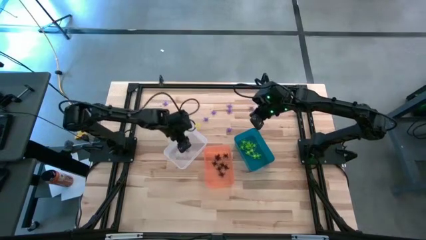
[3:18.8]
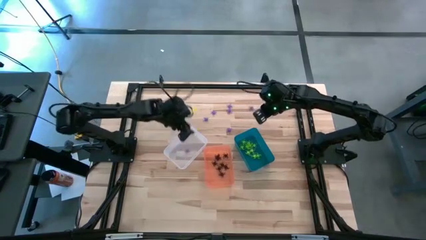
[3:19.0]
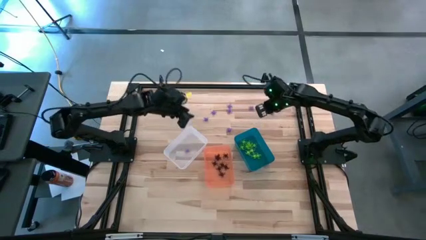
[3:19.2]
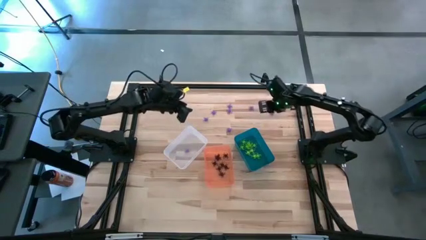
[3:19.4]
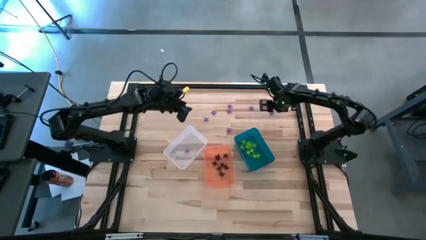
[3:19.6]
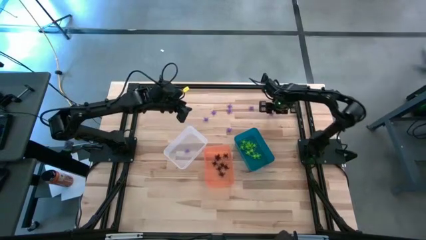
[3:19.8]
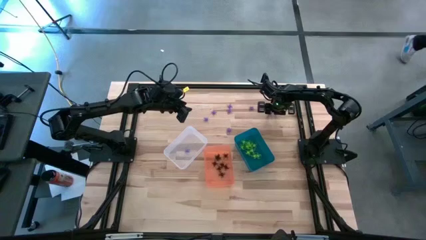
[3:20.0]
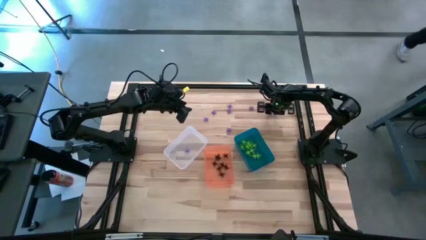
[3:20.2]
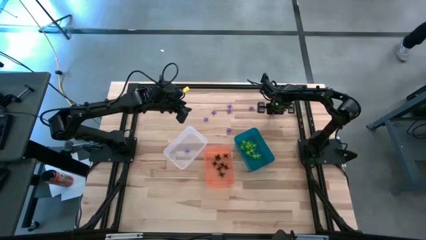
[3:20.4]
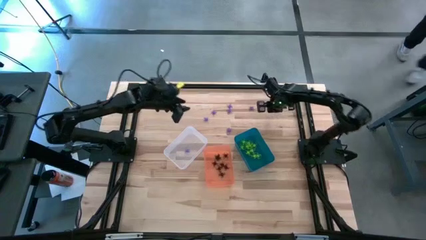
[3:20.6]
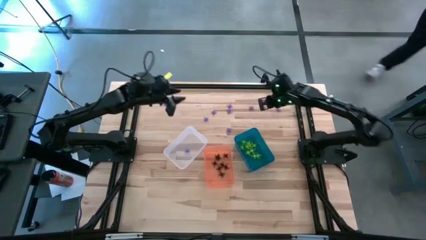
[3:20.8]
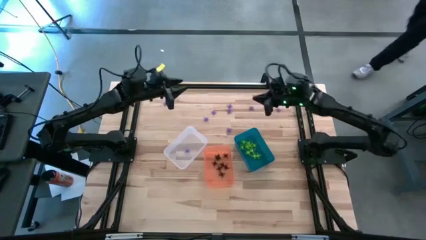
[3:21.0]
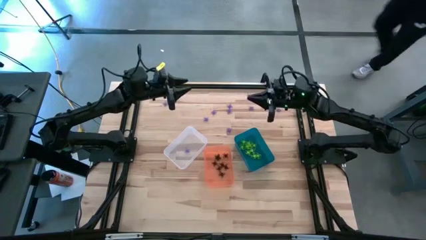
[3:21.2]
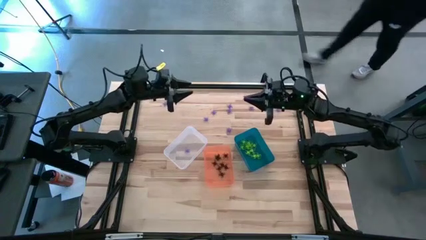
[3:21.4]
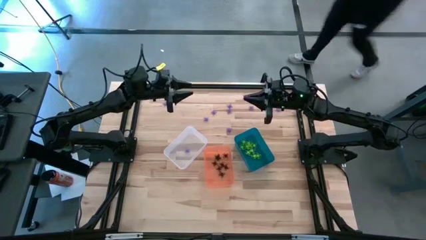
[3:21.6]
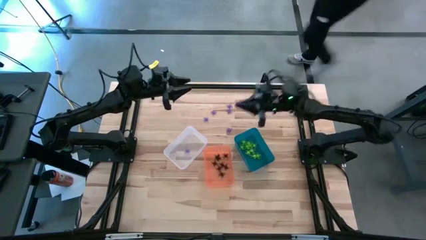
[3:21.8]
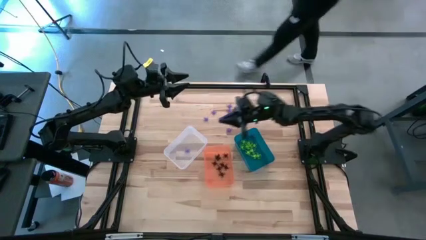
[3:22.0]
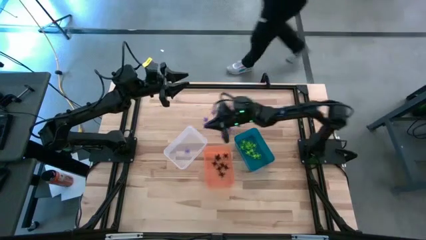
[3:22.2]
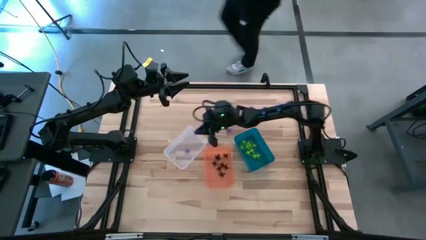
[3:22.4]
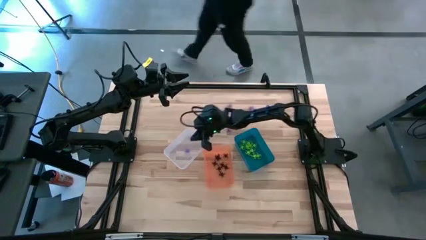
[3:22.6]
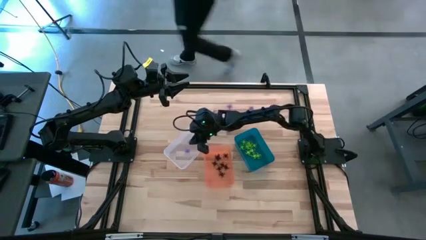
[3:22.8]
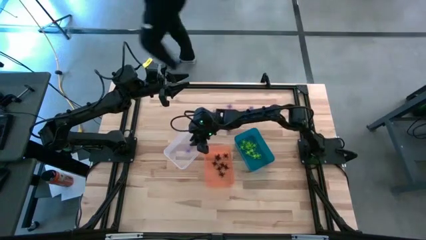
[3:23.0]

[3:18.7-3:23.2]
Task: Sort Halloween decoration
Put the purple spider toy into the transparent bin

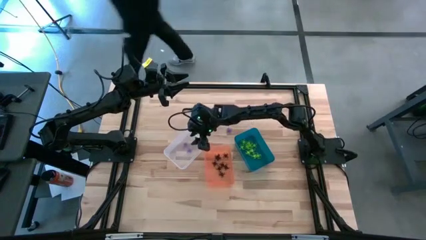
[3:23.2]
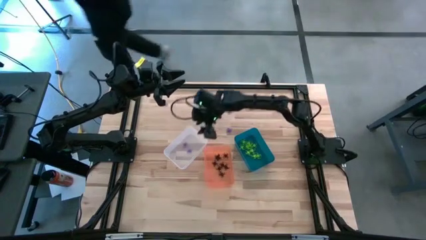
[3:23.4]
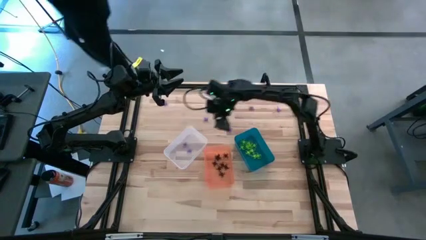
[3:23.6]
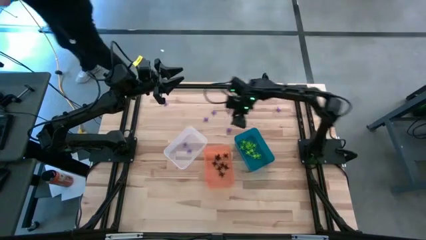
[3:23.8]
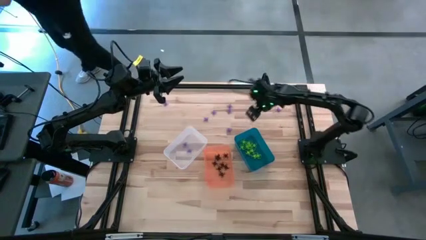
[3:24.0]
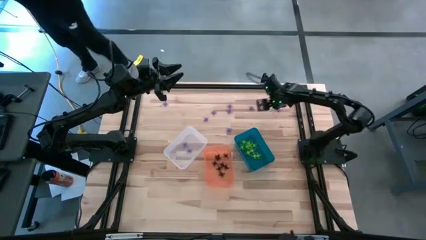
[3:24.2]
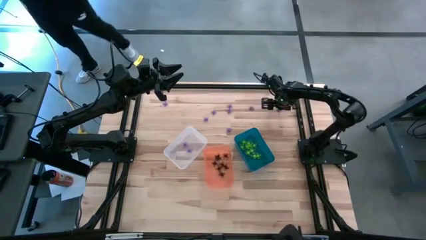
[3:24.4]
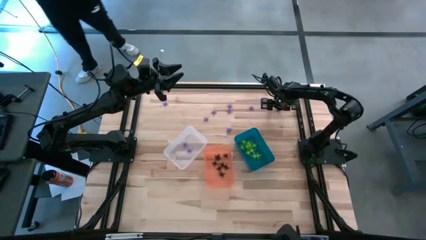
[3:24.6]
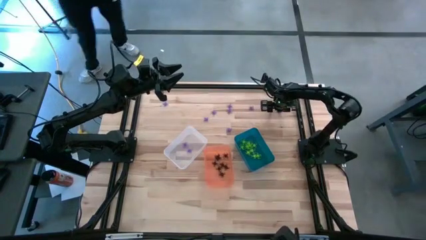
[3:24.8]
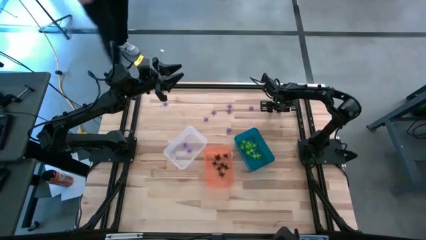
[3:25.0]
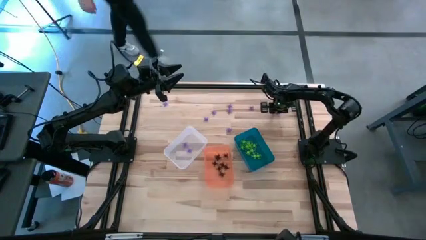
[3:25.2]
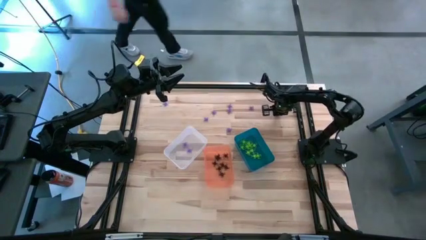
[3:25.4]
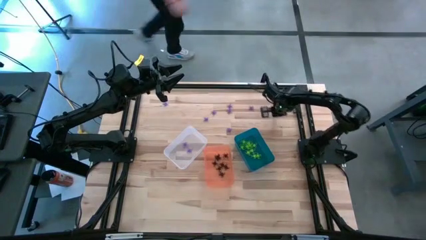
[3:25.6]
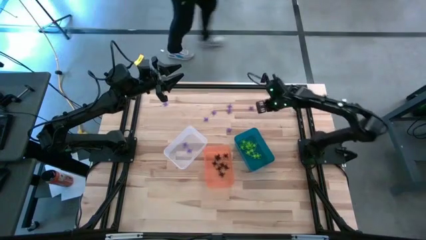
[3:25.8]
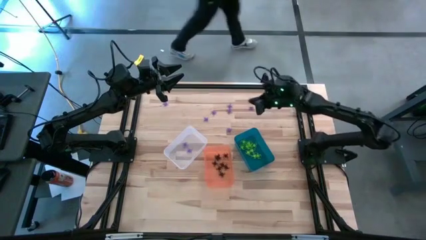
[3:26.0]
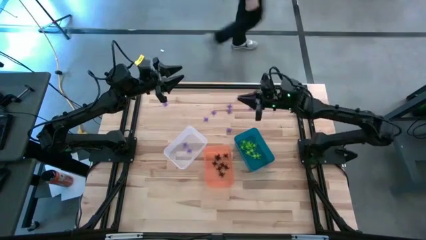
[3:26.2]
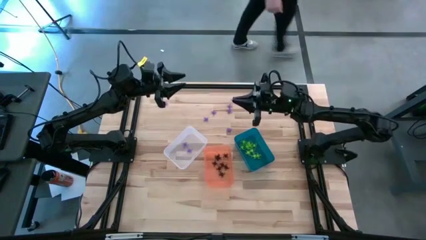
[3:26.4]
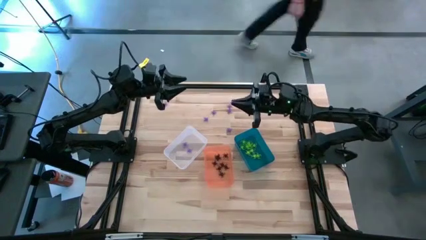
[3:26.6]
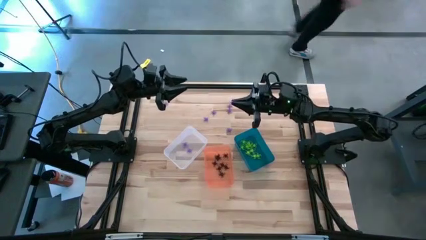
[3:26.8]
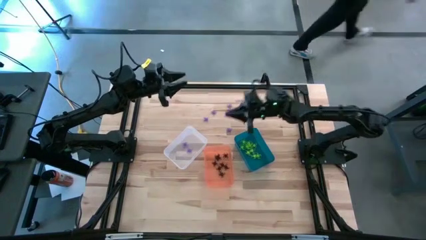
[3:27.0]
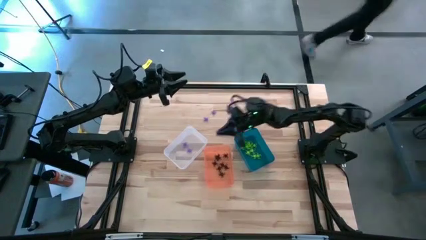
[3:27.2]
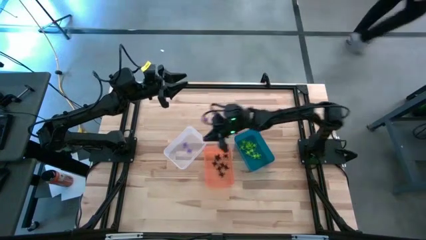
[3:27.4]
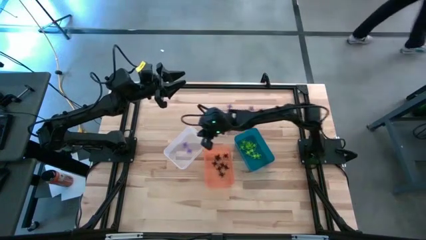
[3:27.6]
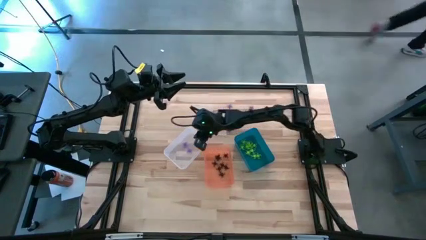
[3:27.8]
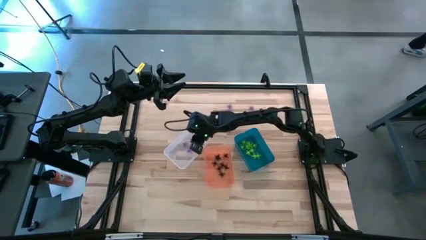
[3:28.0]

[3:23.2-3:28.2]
Put the purple spider toy into the transparent bin

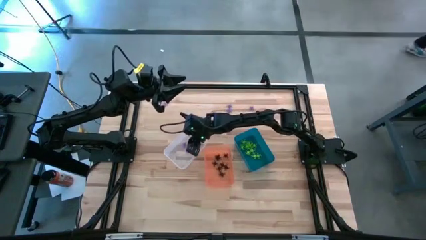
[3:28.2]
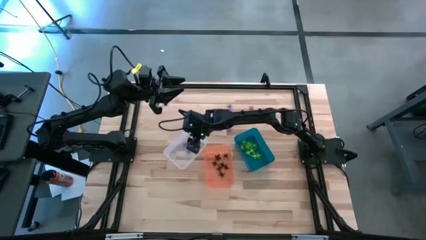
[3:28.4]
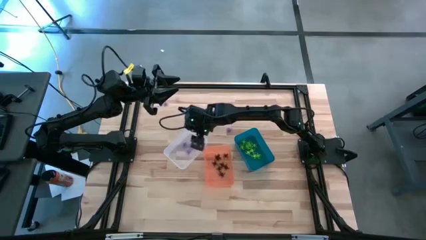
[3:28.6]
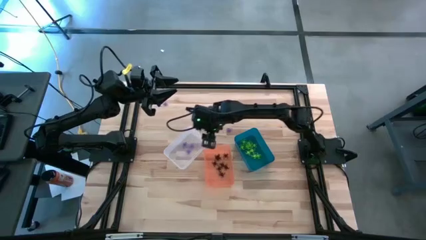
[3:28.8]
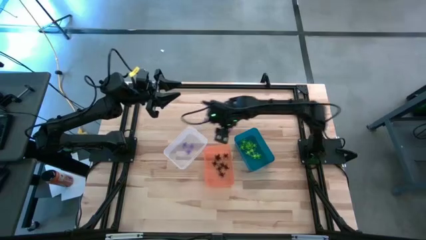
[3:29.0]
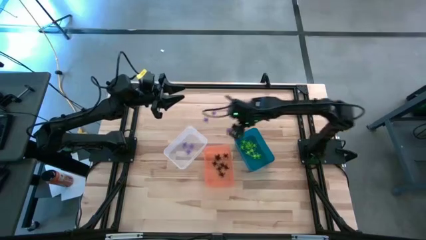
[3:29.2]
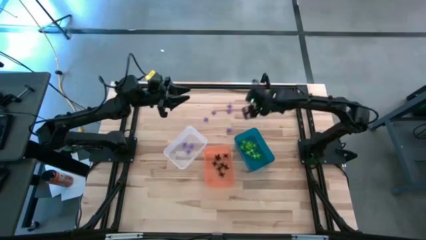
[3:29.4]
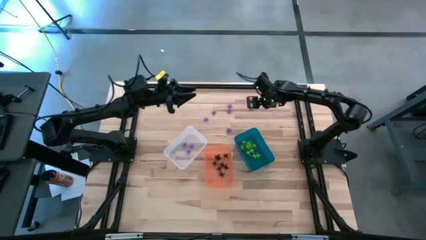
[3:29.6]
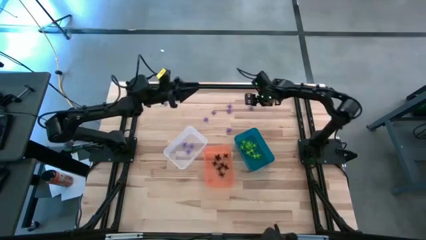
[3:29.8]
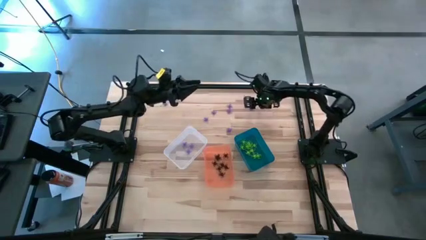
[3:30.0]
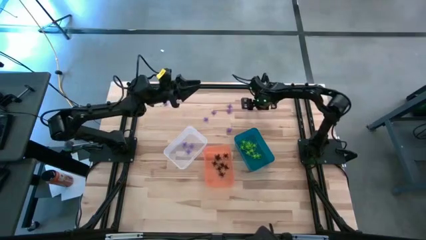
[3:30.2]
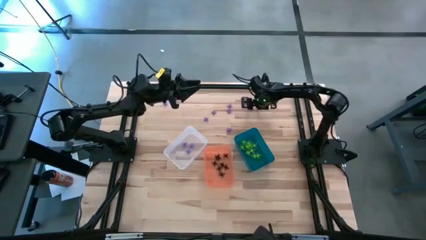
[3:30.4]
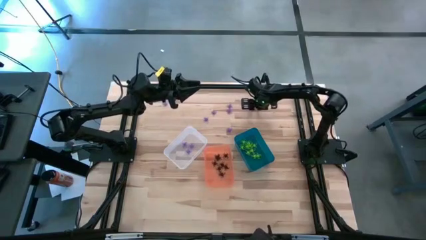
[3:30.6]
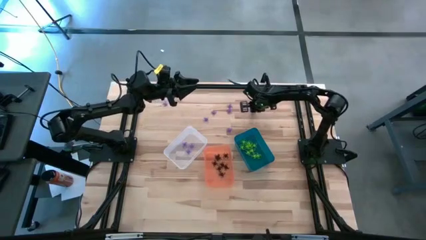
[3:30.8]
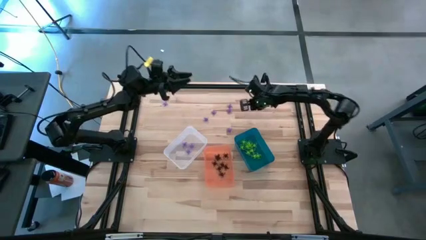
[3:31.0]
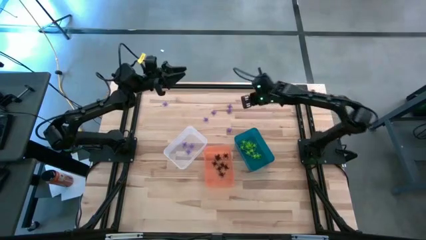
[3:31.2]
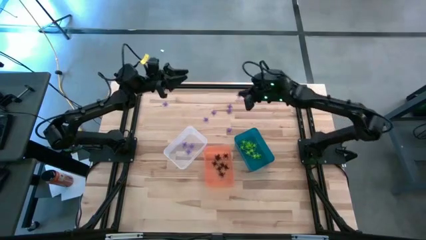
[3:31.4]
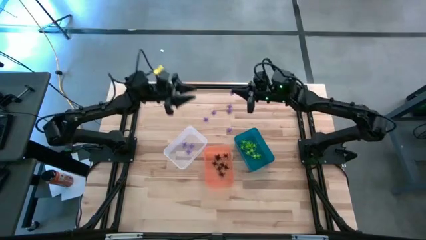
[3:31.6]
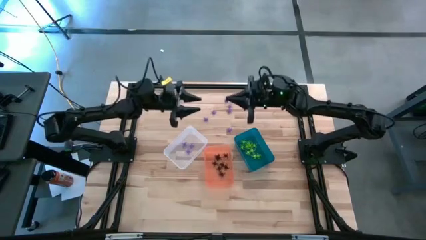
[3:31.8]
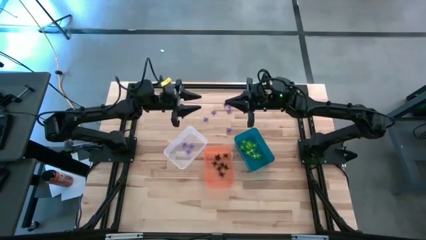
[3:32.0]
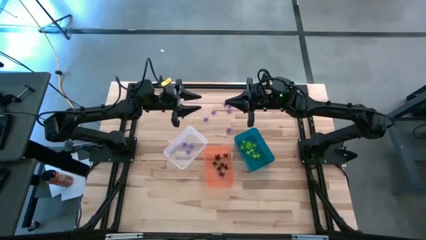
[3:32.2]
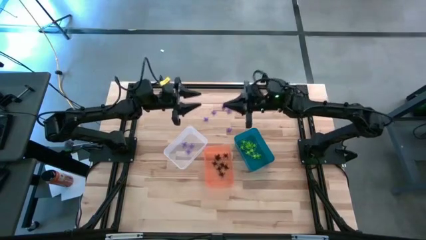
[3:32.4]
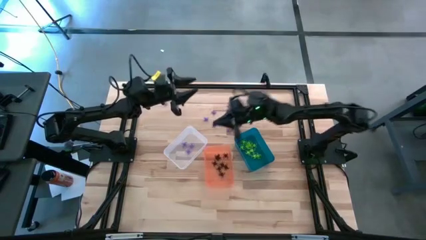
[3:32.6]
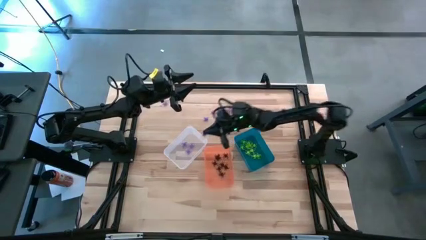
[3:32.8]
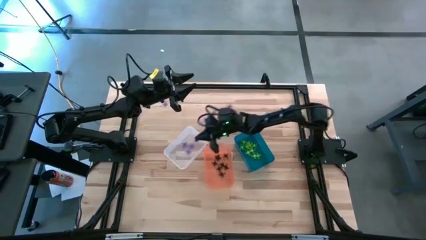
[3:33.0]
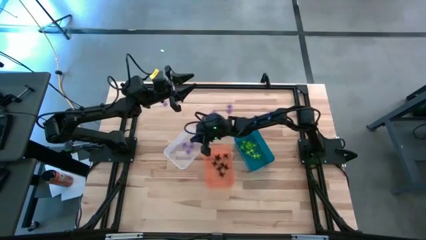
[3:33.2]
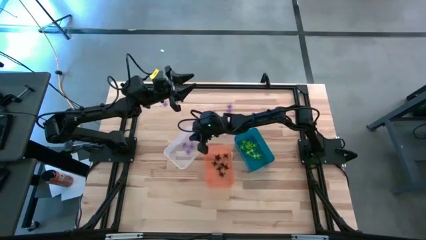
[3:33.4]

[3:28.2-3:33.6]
Put the purple spider toy into the transparent bin
